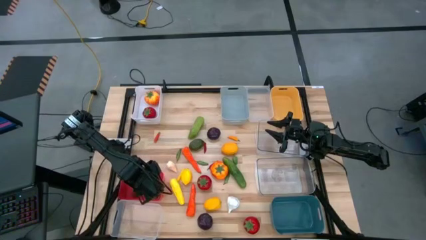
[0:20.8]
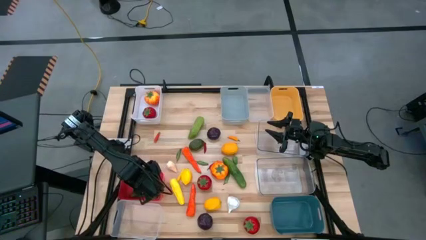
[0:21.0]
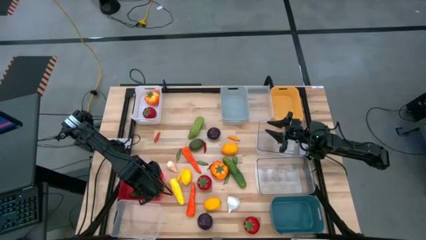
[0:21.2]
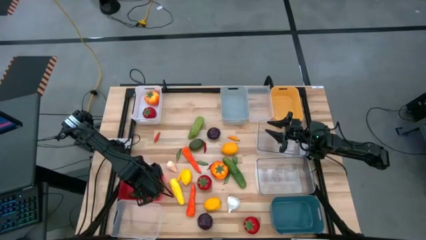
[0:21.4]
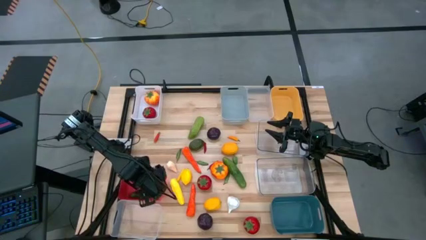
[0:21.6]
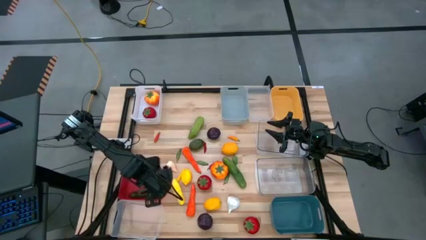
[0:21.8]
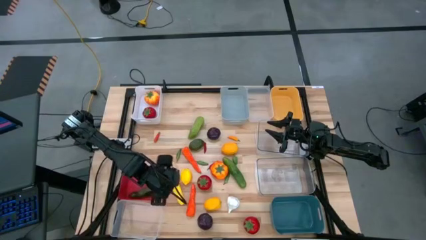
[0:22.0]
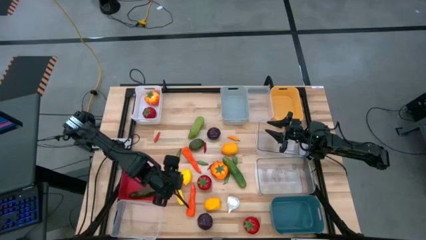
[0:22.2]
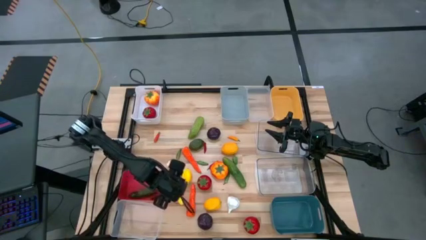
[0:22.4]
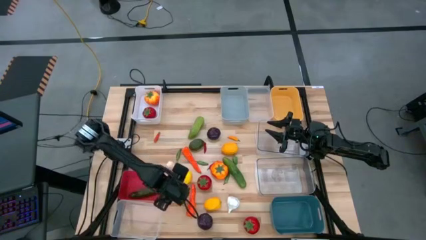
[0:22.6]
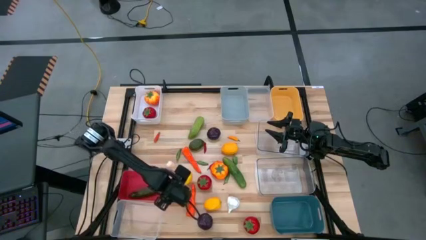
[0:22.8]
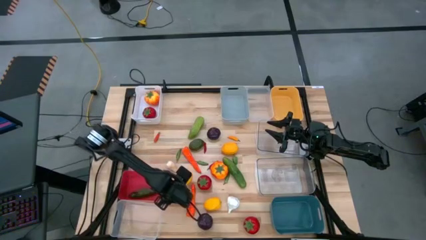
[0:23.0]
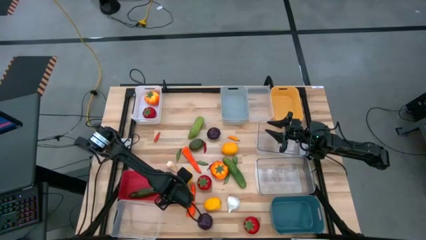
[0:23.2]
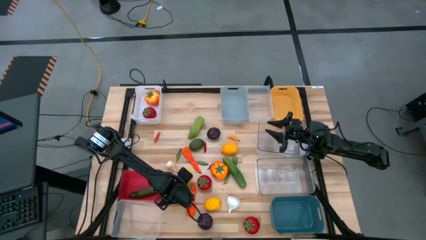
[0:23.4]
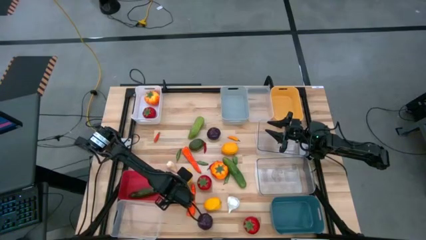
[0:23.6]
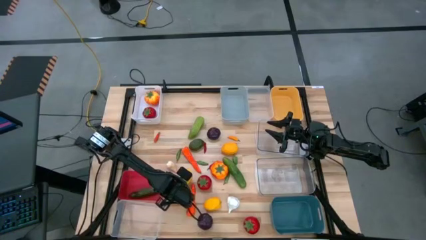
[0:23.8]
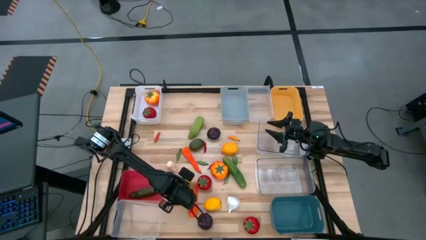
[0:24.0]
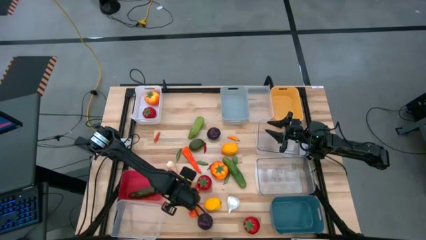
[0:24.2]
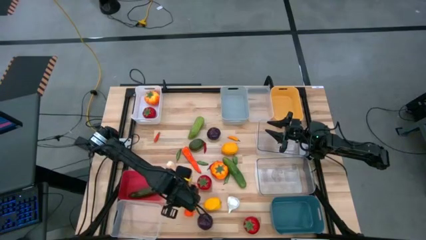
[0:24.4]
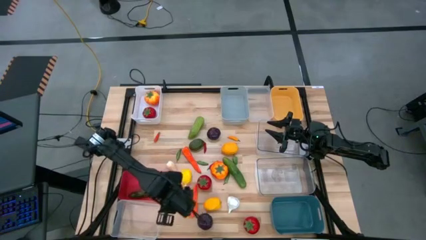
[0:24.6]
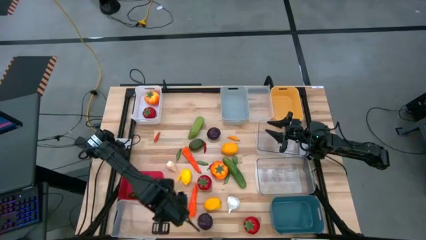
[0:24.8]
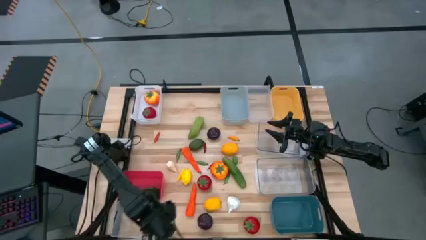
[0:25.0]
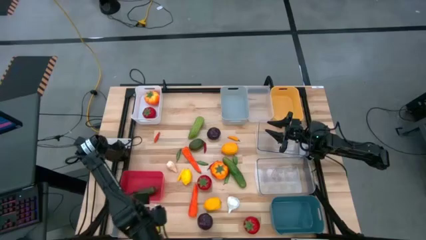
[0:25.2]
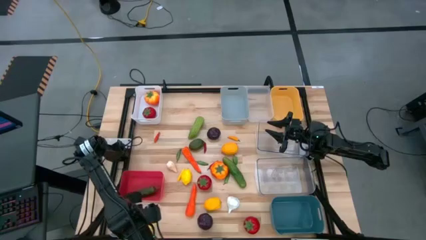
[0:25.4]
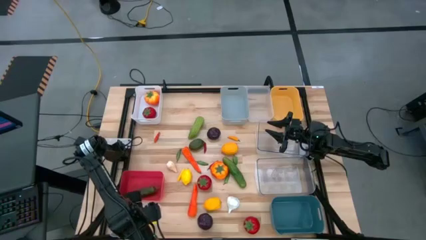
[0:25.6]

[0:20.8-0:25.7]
Task: Sort produce into baskets
Put the big corn into the bottom white transparent bin

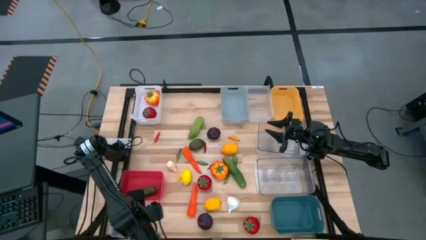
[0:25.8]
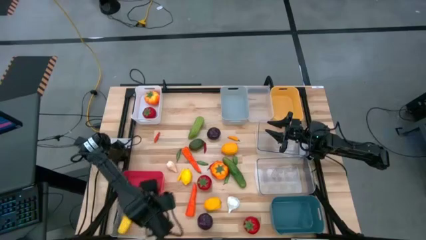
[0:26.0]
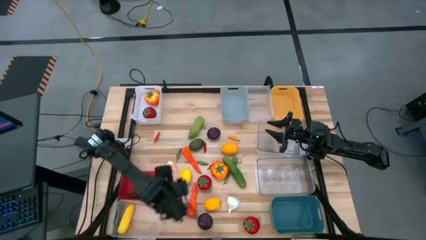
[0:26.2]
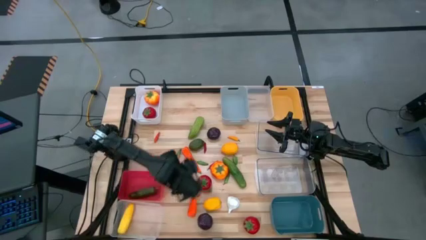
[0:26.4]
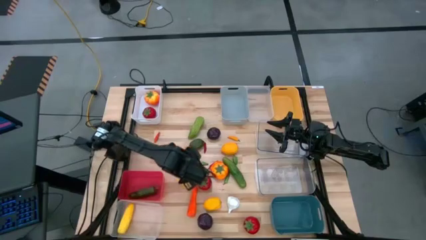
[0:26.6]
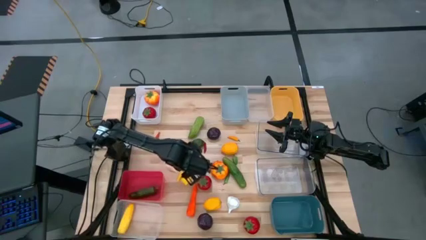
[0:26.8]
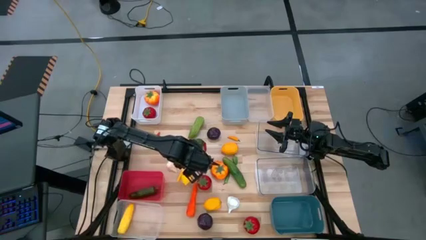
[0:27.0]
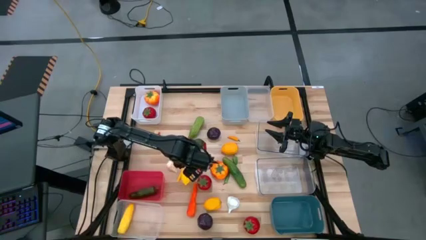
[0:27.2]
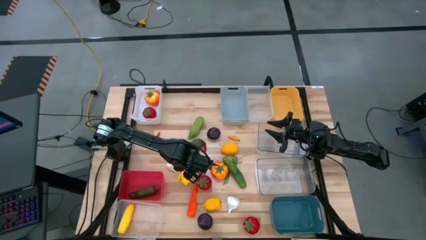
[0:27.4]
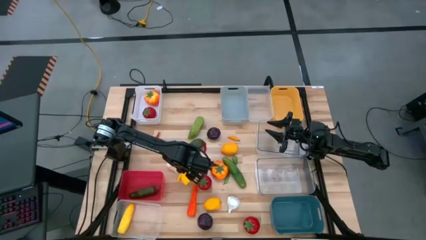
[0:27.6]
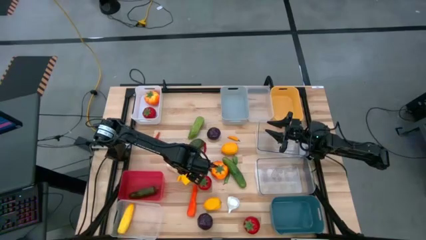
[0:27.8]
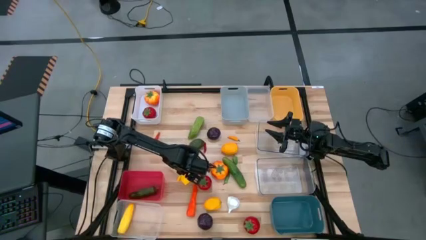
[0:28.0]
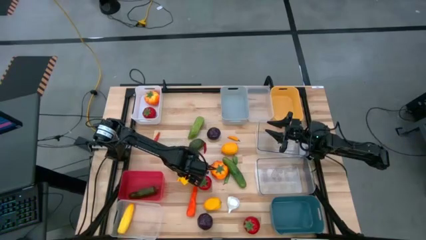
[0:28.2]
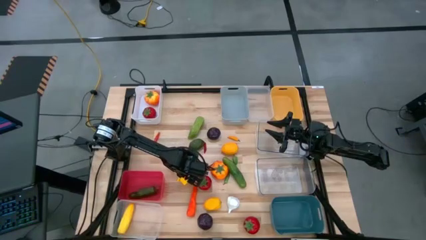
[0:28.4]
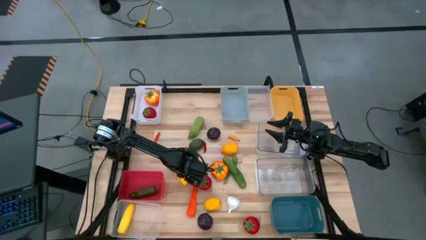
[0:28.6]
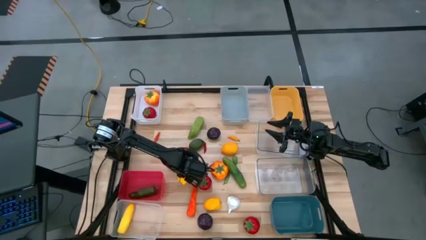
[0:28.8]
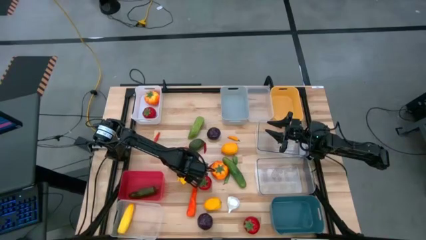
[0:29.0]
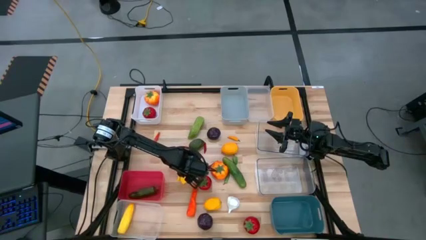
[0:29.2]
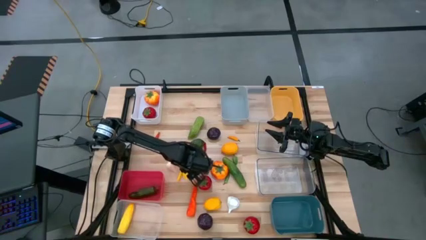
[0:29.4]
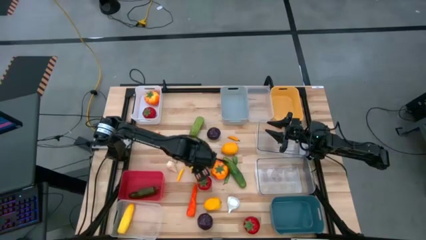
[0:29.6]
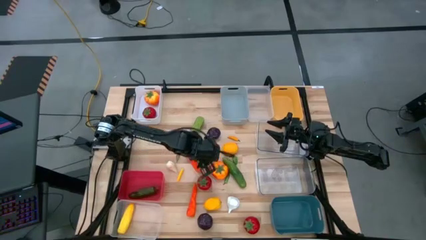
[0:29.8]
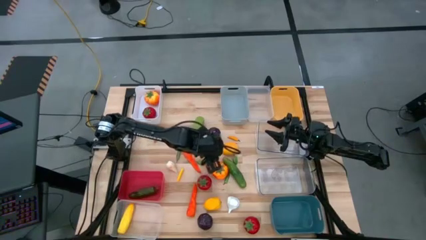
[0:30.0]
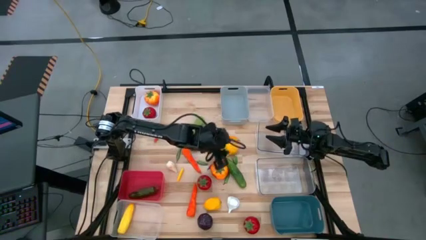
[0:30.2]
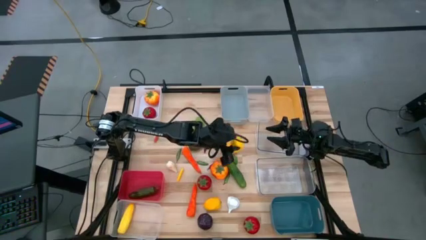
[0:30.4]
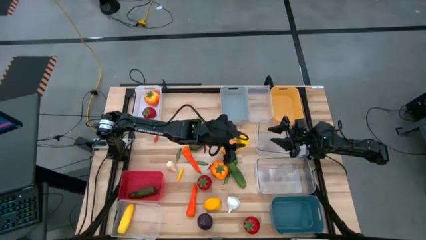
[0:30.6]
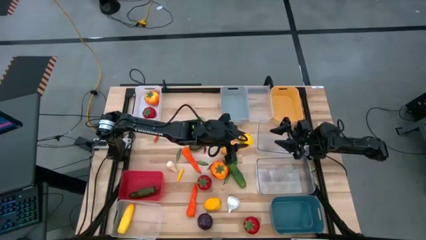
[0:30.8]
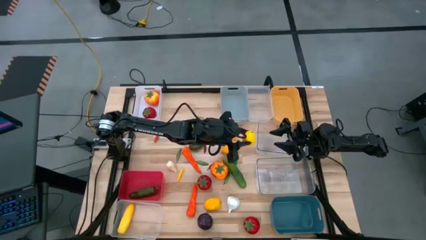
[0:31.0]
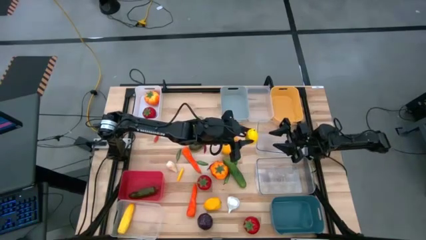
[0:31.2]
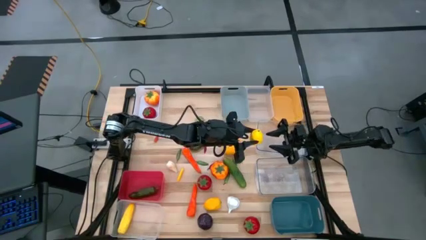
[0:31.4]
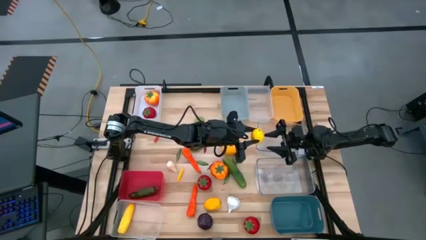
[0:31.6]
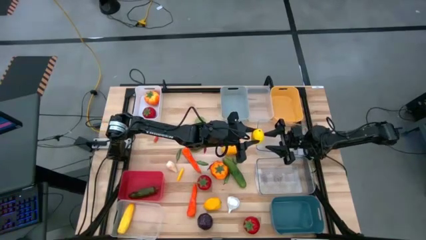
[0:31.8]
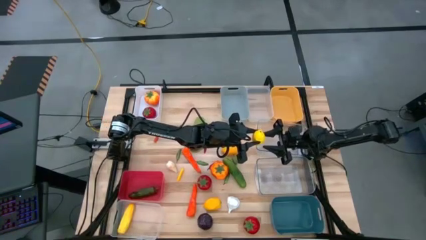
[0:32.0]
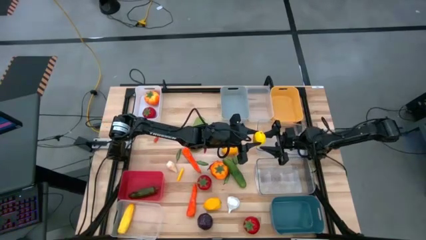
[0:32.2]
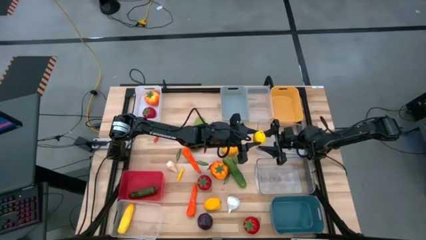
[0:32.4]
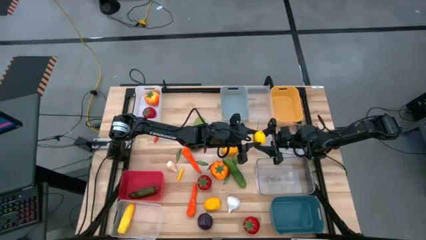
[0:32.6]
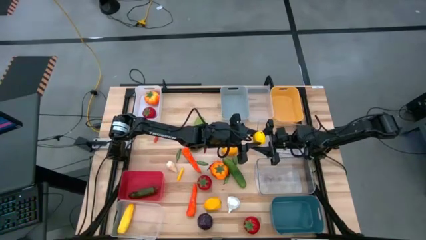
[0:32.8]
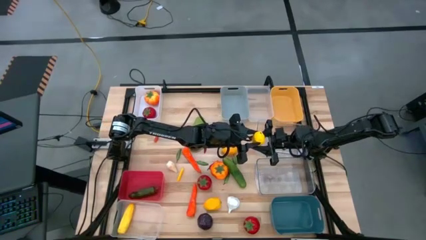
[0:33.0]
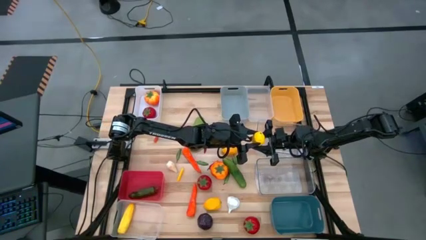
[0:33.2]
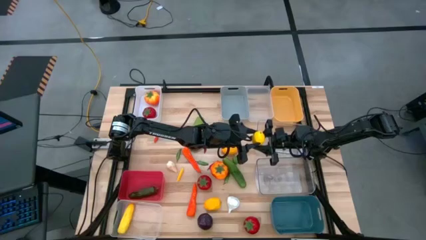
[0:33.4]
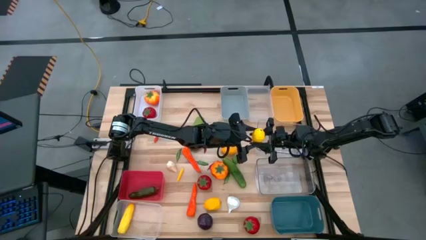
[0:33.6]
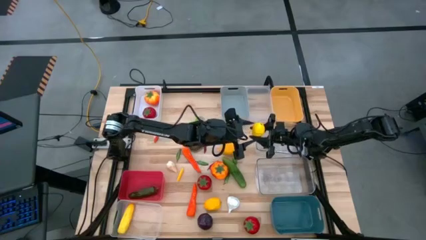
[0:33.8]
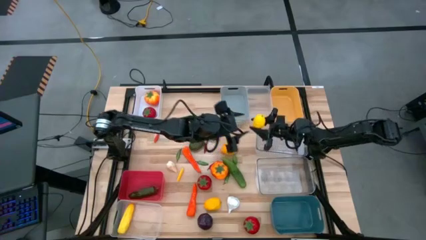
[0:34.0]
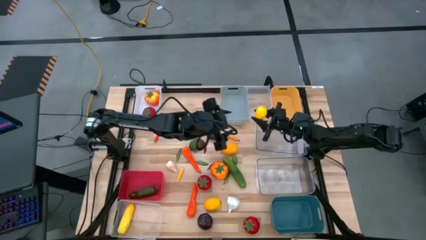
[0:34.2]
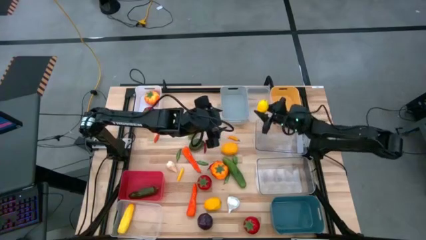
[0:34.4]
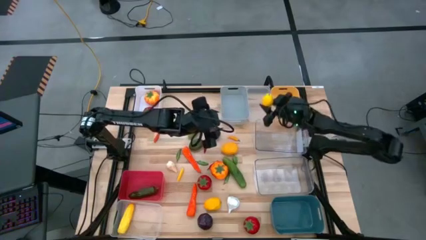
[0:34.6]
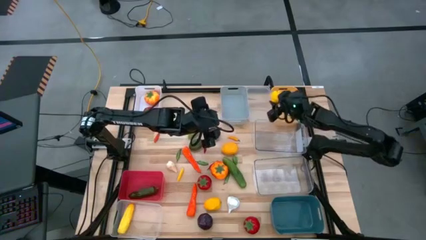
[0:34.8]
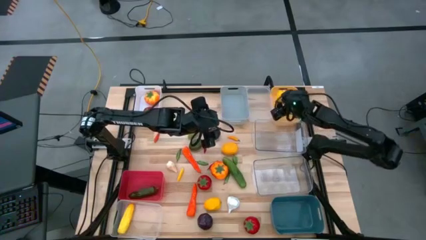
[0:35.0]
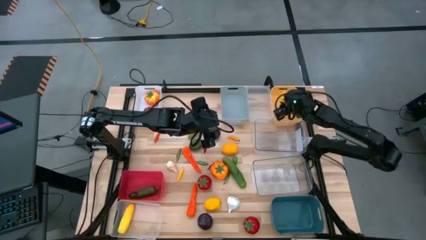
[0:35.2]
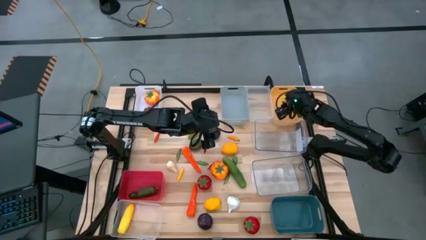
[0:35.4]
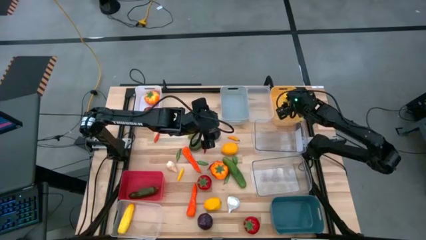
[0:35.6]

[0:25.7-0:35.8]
Put the left yellow lemon into the yellow bin
